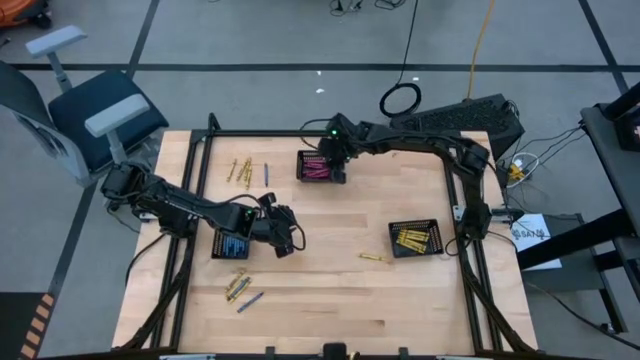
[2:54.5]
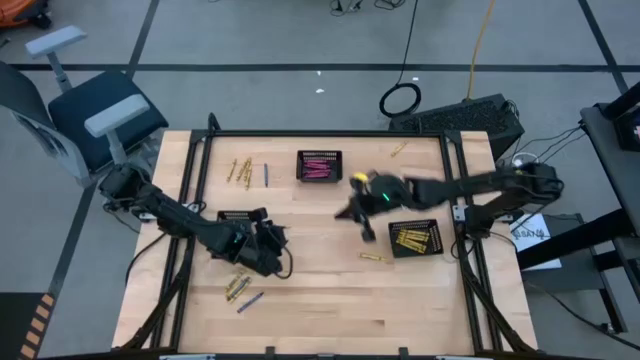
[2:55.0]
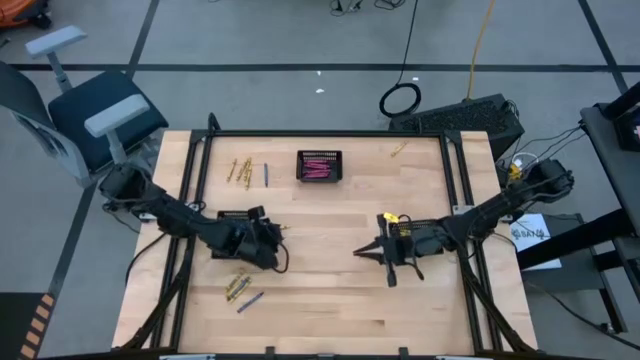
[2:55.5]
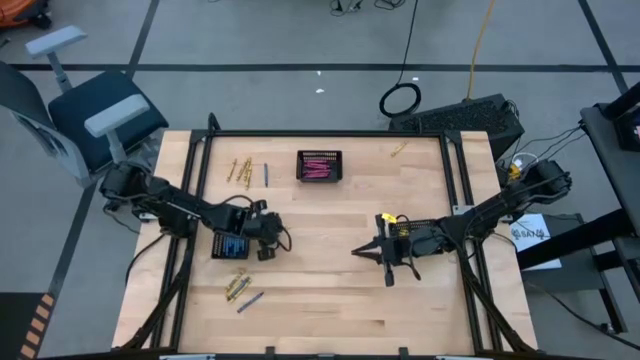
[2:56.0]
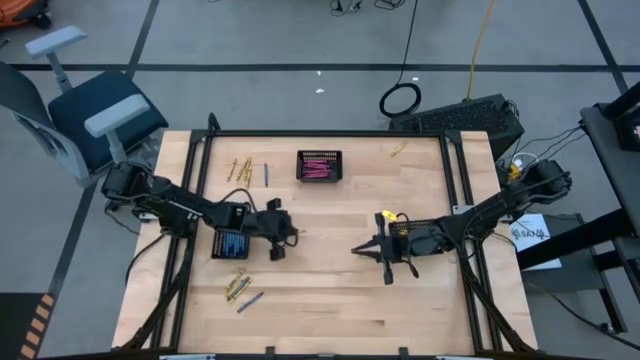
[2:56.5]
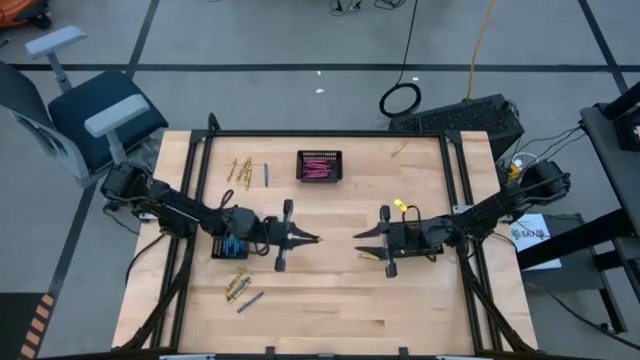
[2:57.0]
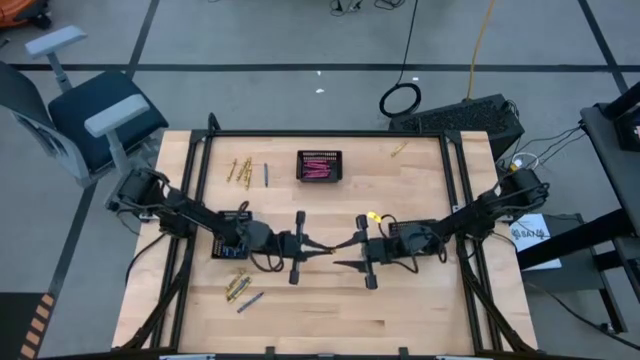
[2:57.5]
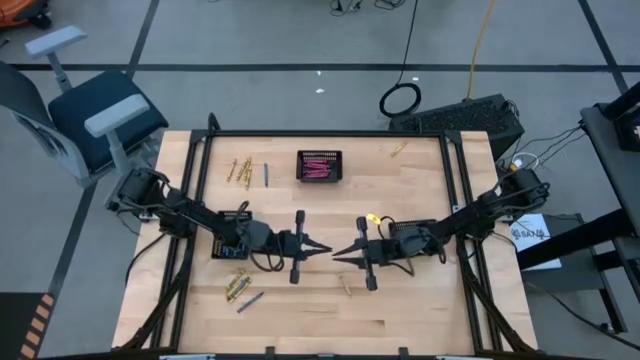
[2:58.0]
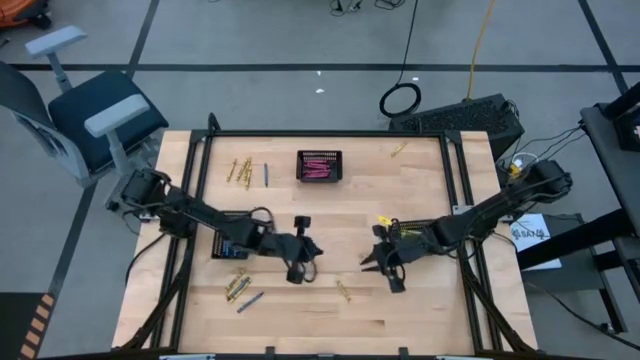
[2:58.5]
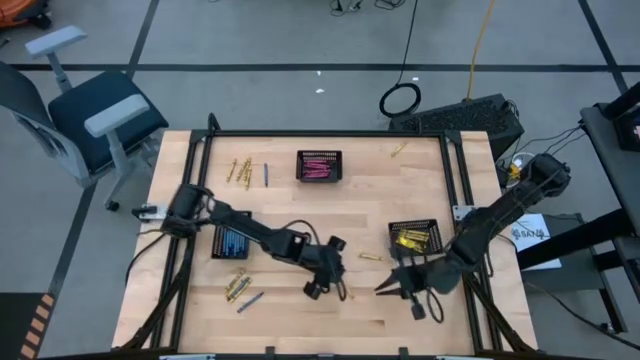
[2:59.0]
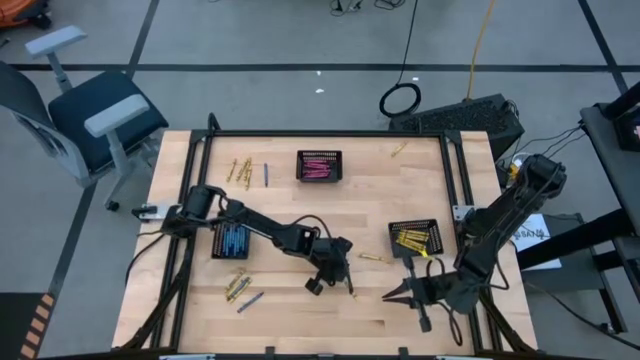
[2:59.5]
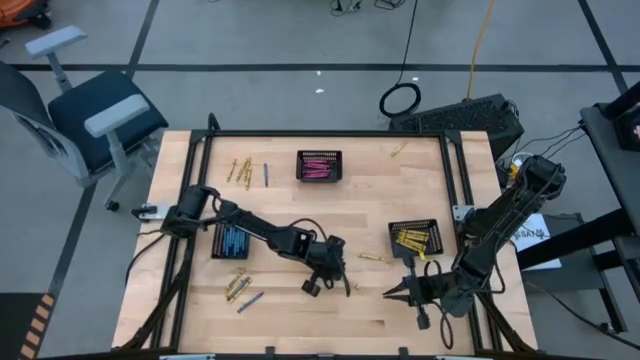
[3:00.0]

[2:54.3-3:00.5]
Task: Sort crayons
Put the yellow crayon into the bottom right black bin

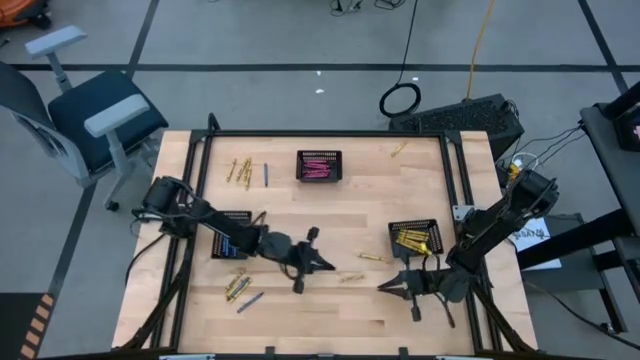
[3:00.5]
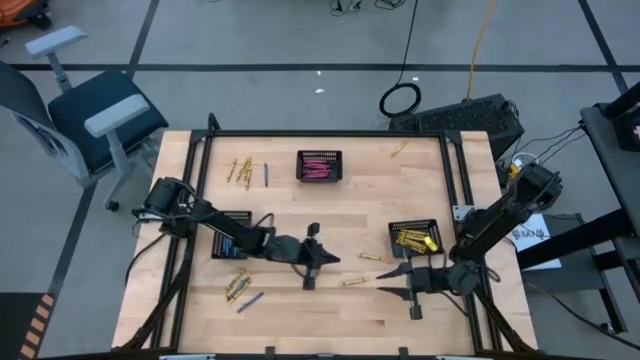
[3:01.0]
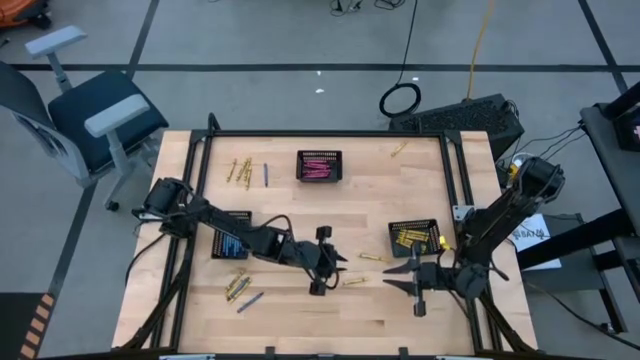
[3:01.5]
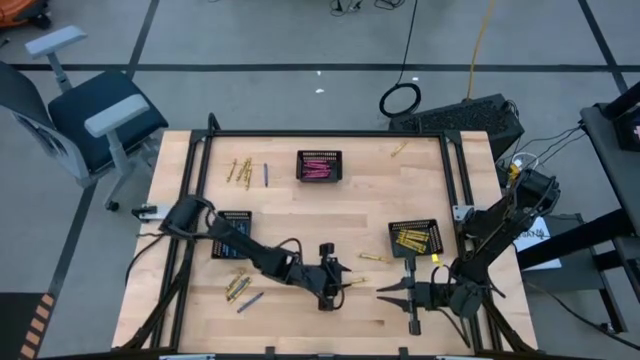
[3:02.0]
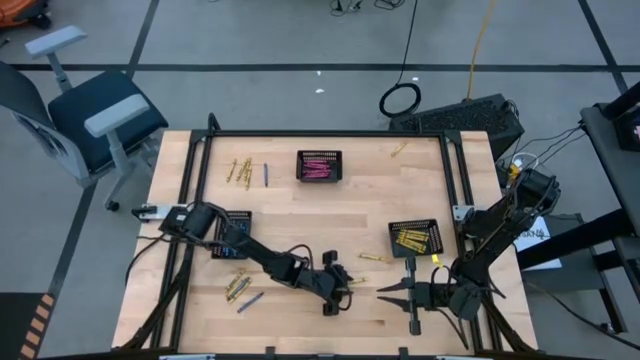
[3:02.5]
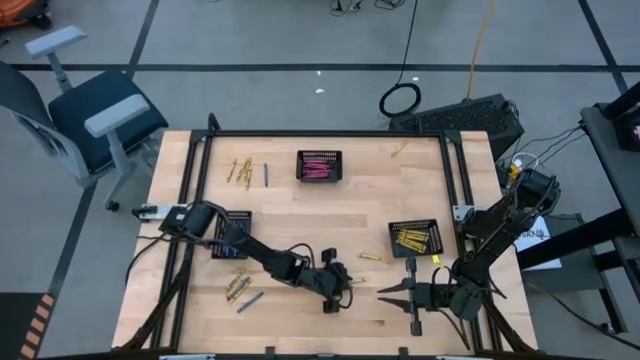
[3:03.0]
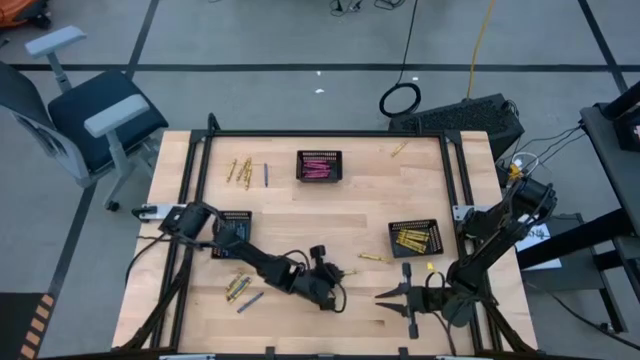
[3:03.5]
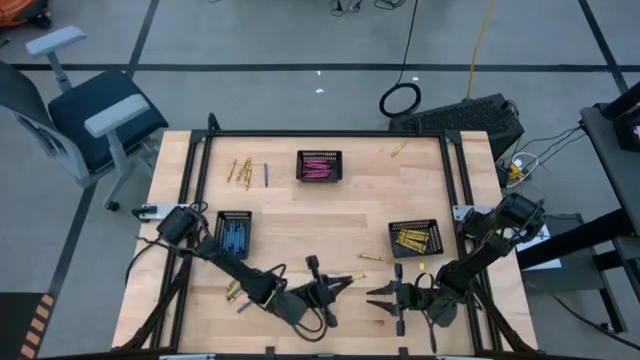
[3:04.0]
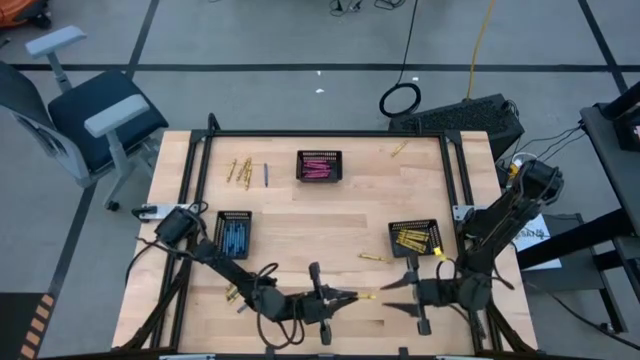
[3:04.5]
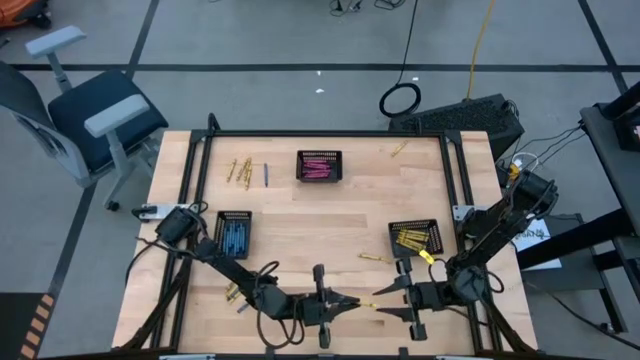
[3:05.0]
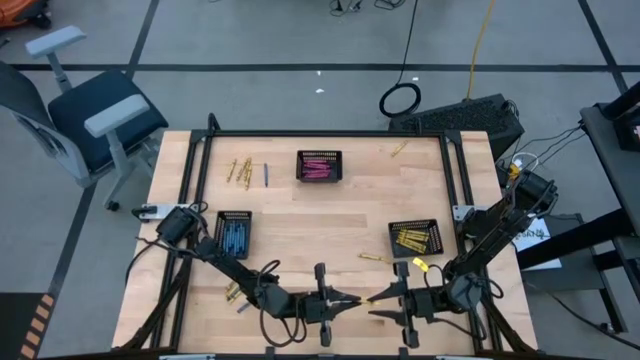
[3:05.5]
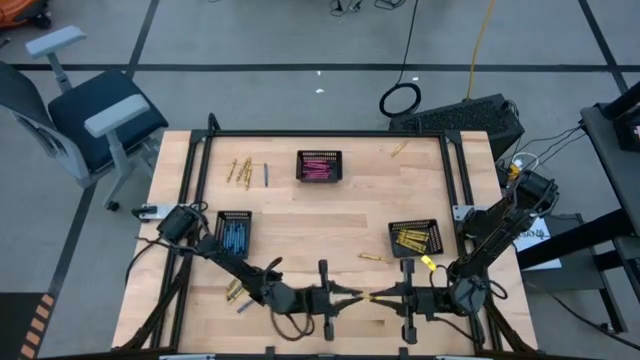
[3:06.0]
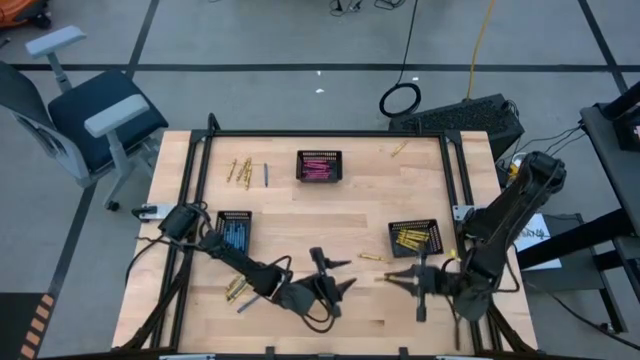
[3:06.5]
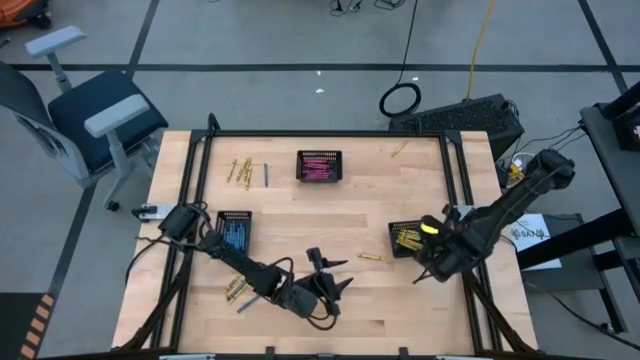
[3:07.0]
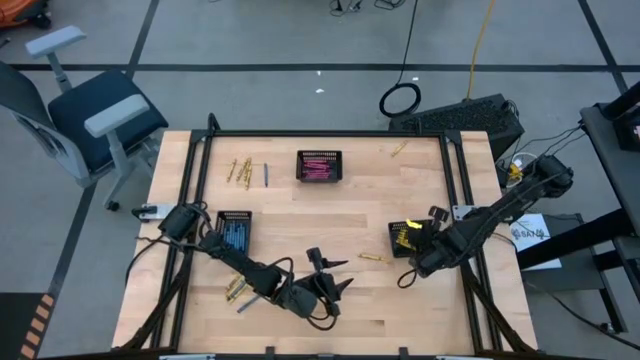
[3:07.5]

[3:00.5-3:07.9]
Put the yellow crayon into the bottom right black bin

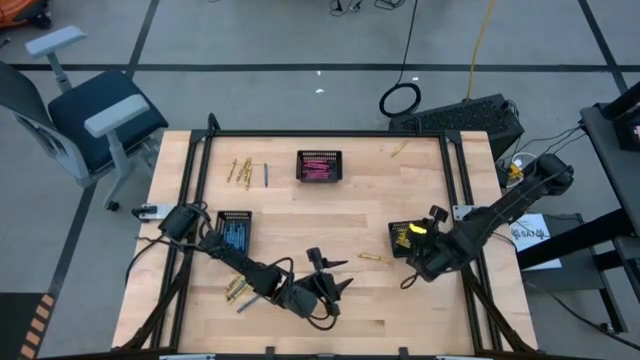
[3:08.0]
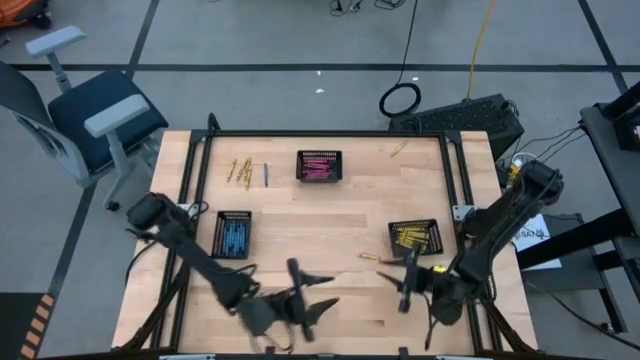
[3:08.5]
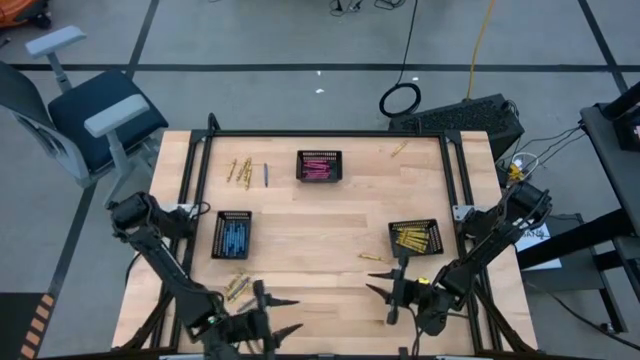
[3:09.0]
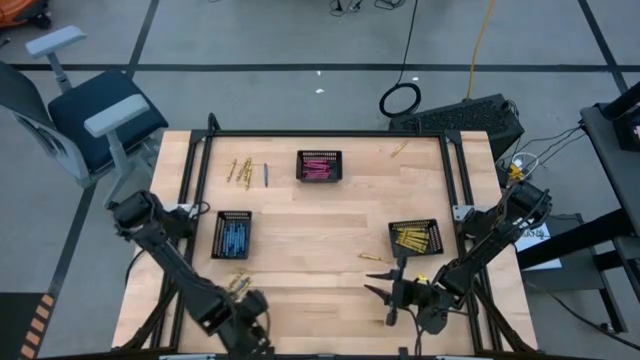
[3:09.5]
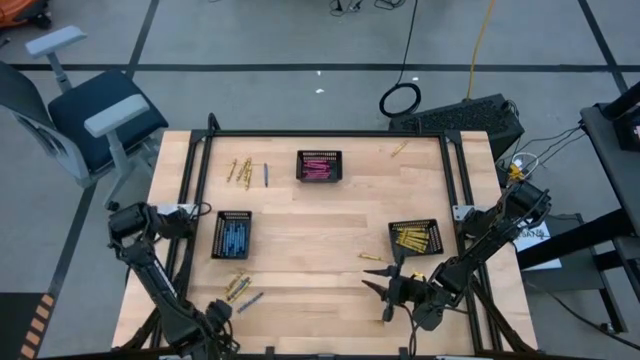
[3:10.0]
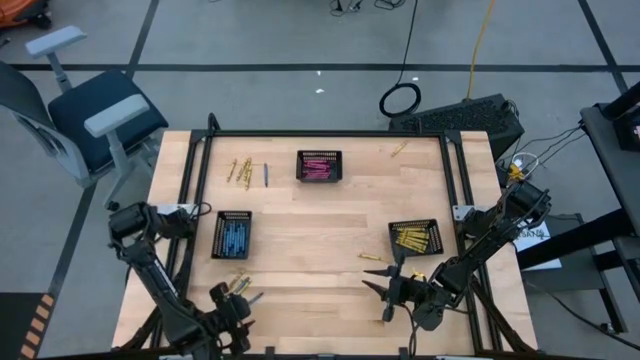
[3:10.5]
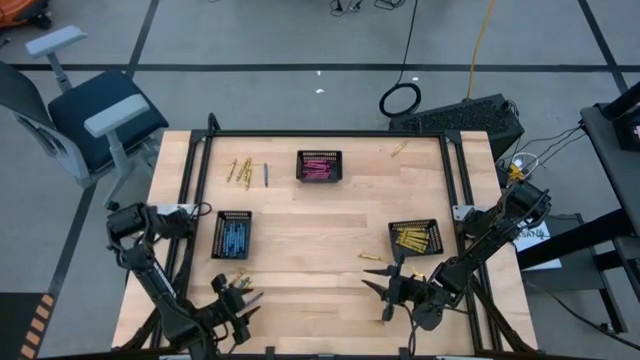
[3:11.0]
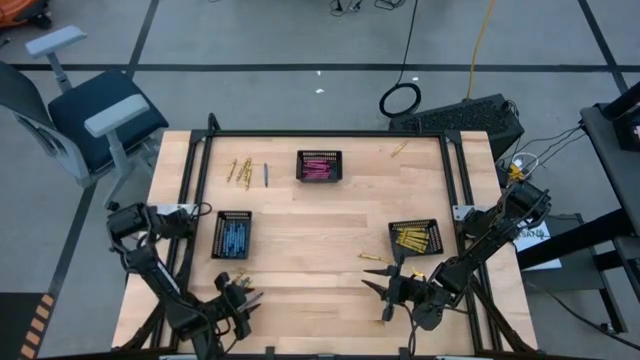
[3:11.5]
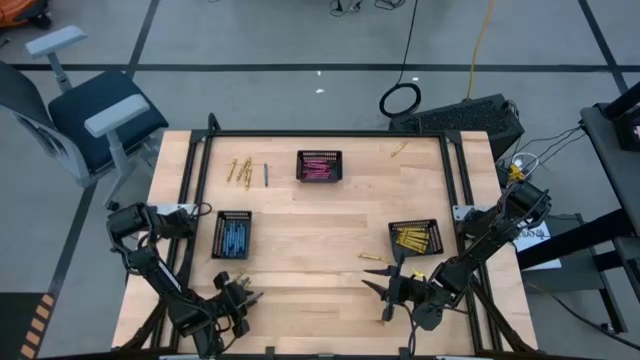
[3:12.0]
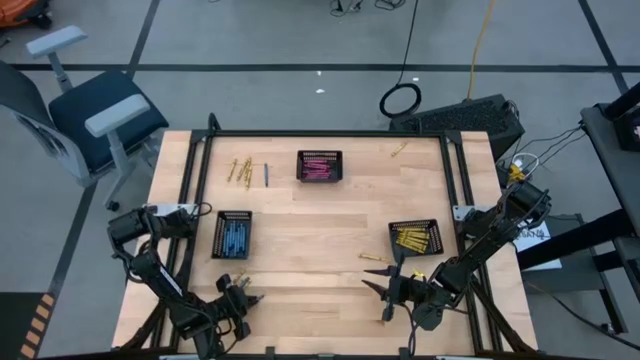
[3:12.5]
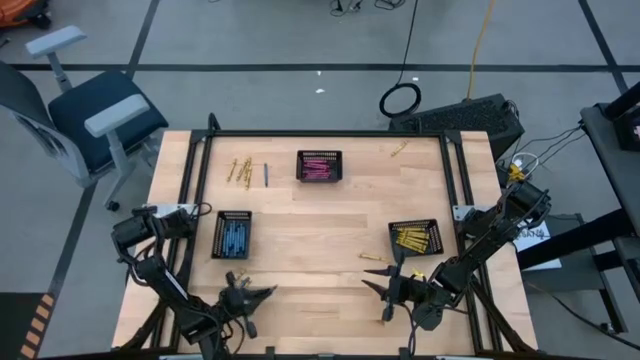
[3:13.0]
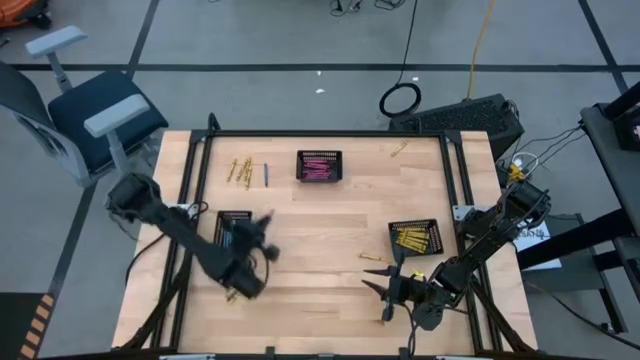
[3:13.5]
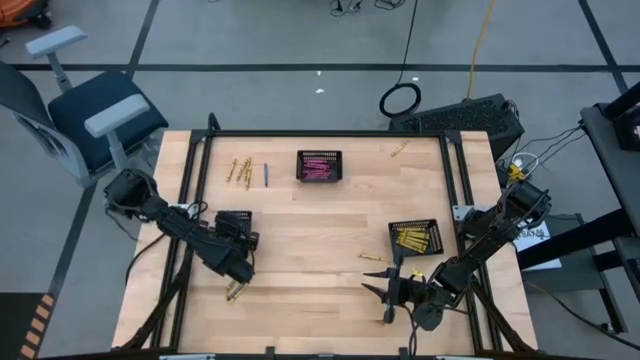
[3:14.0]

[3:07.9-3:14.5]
Put the bottom blue crayon into the bottom left black bin

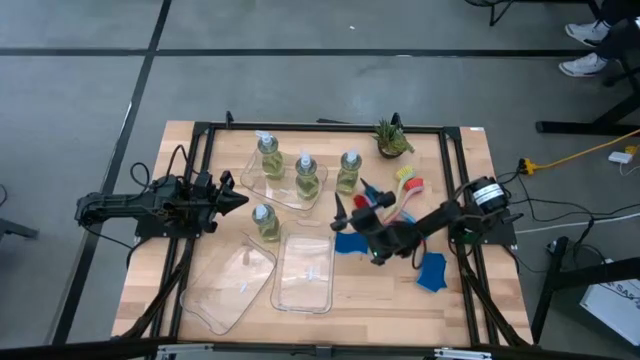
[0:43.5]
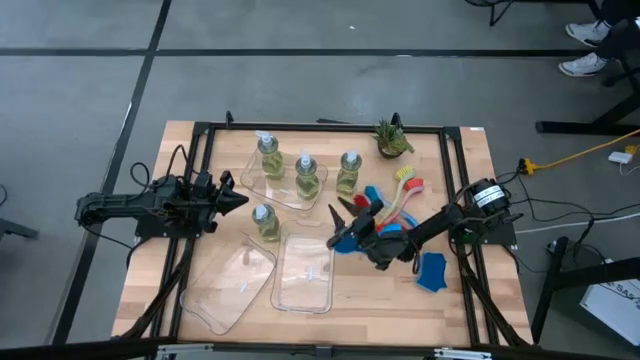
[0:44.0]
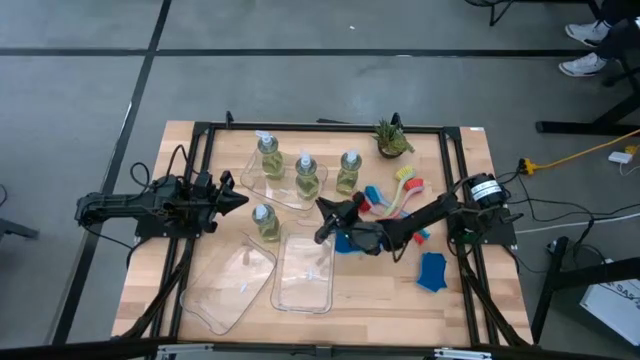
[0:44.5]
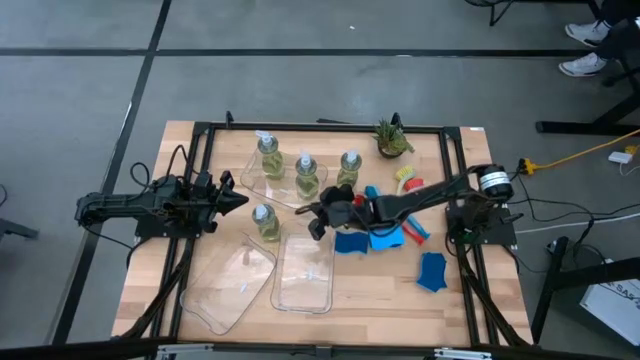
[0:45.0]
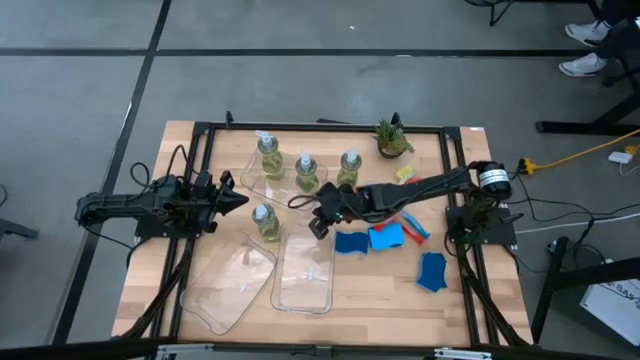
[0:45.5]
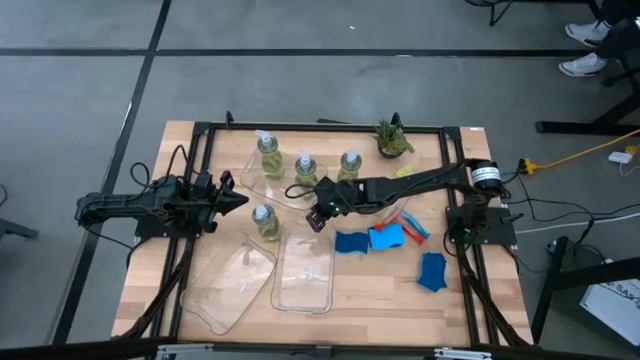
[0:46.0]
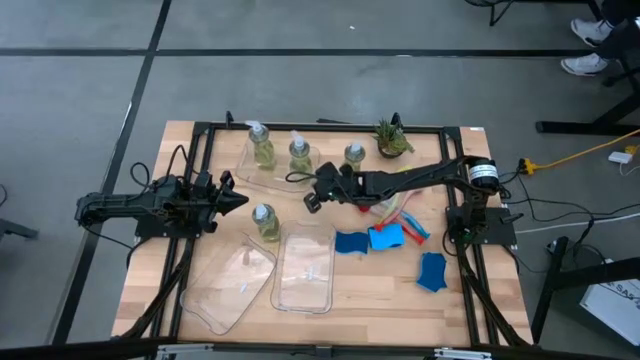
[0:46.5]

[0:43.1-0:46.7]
Task: Pick & Place Kitchen Sink Supplies
Adjust the top transparent bin
